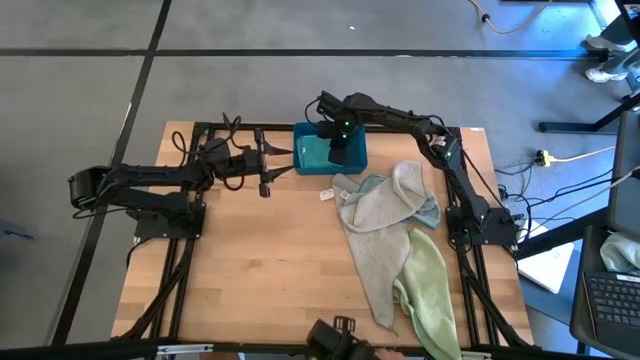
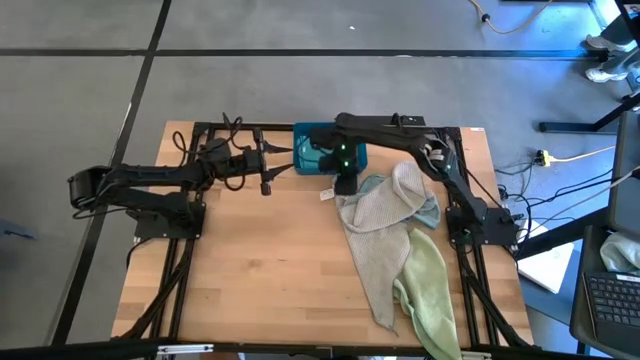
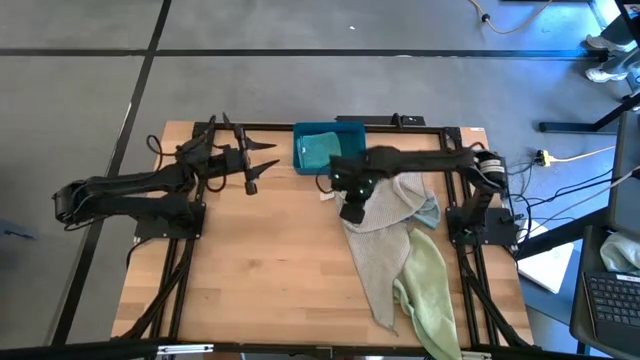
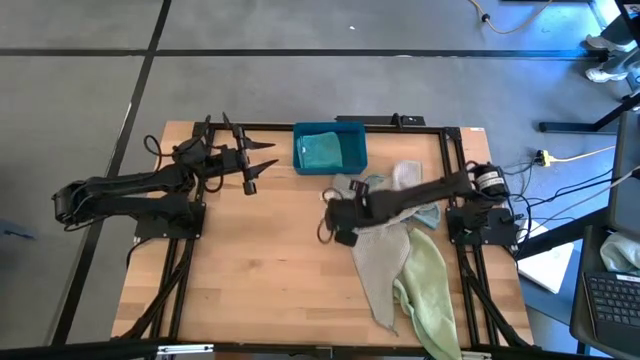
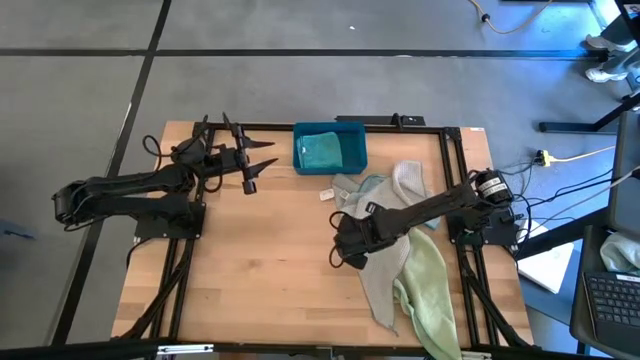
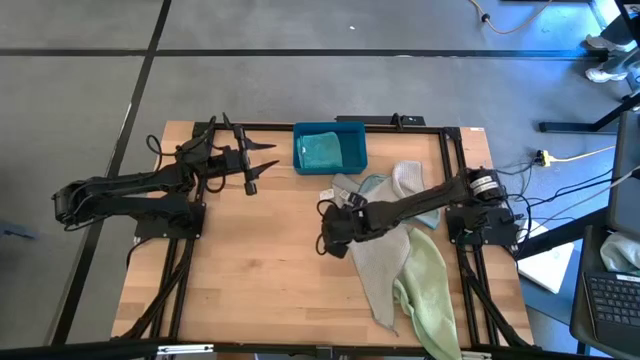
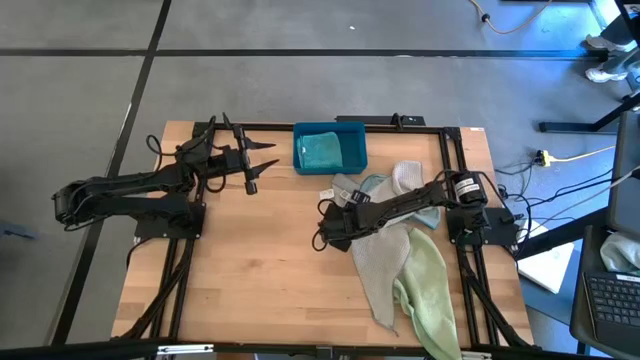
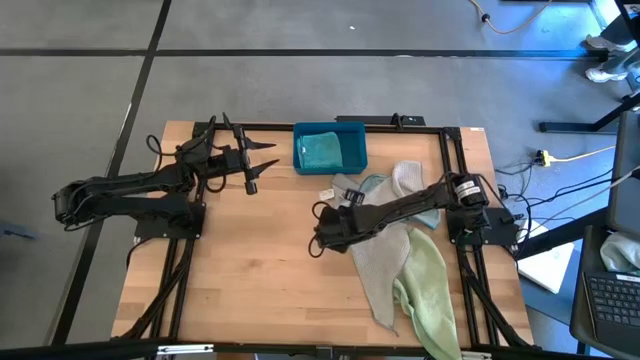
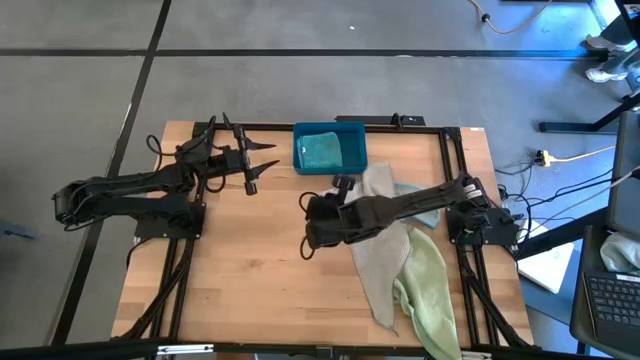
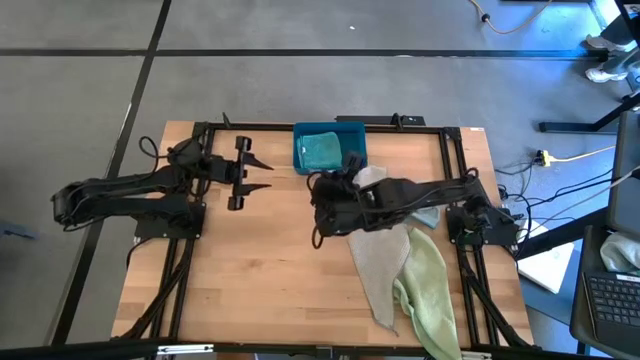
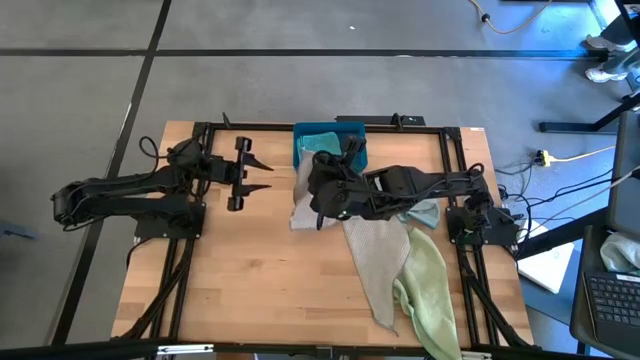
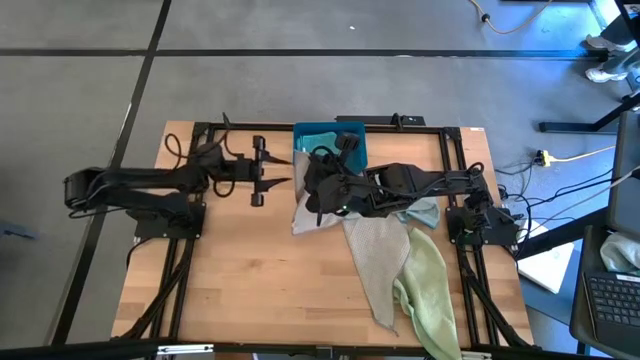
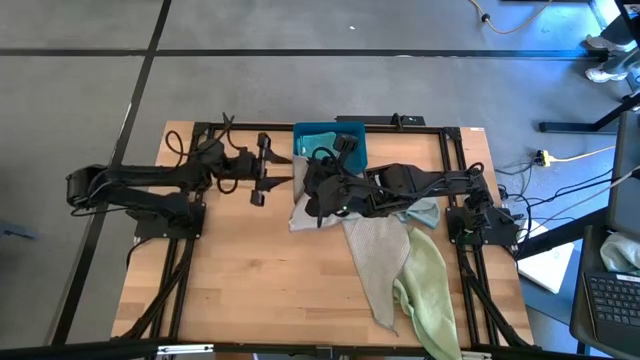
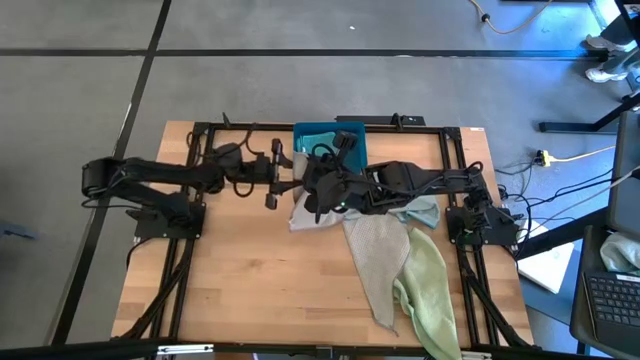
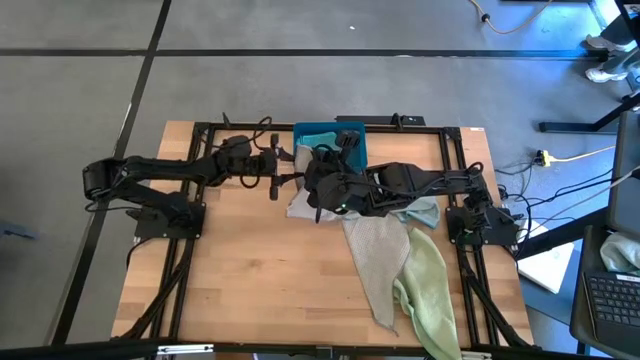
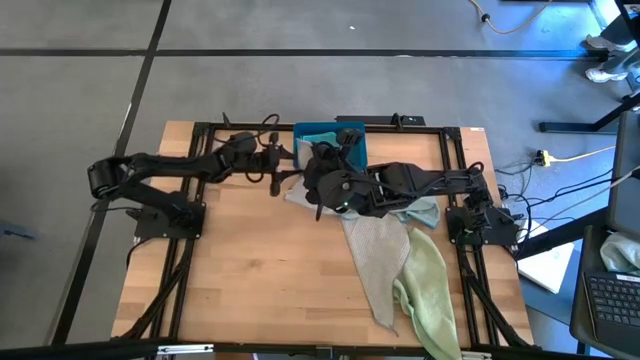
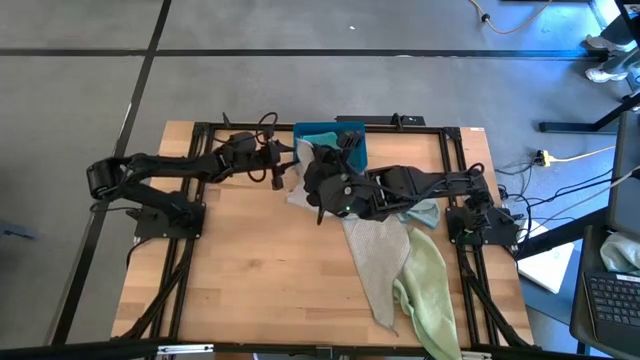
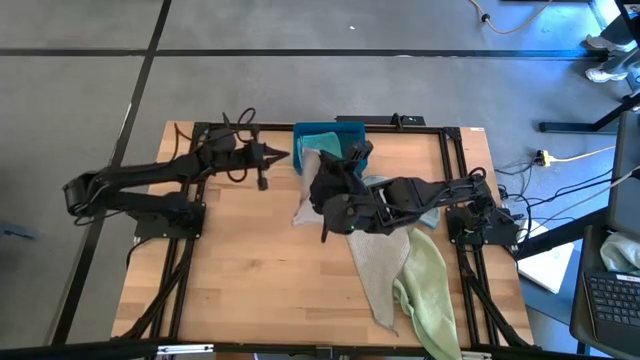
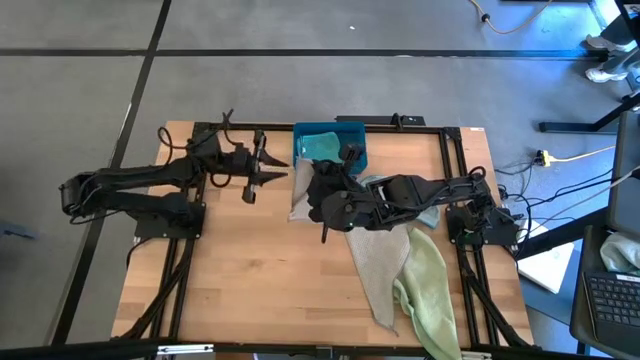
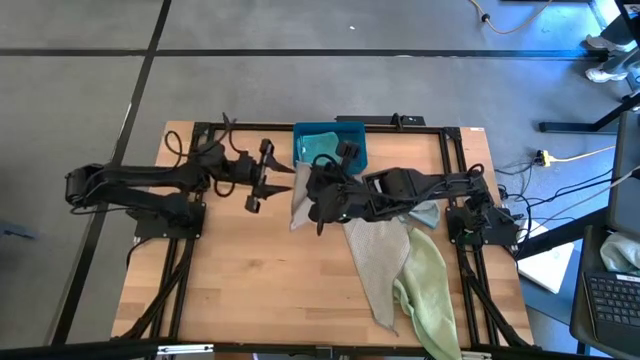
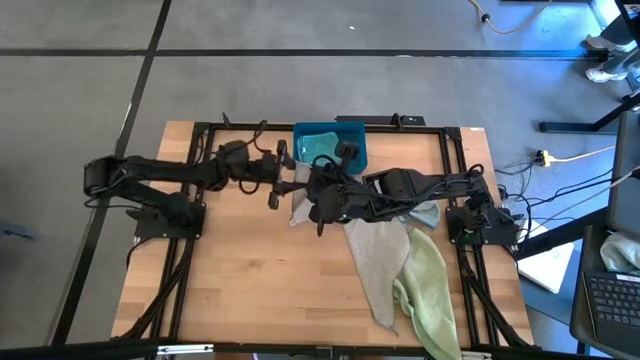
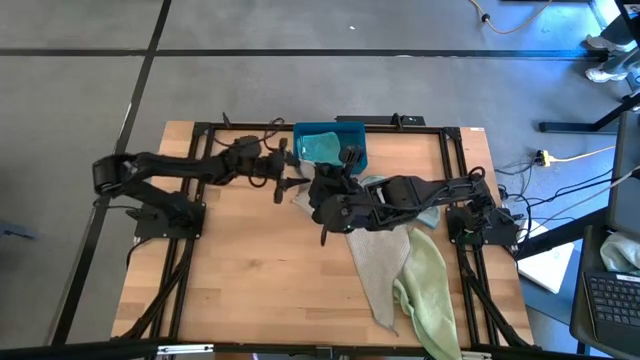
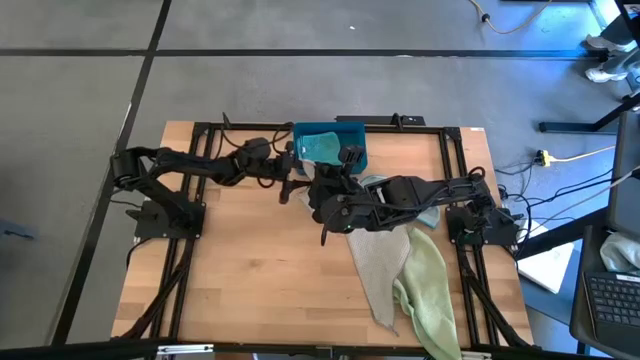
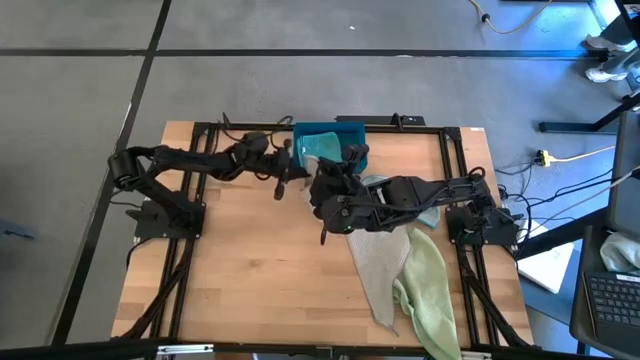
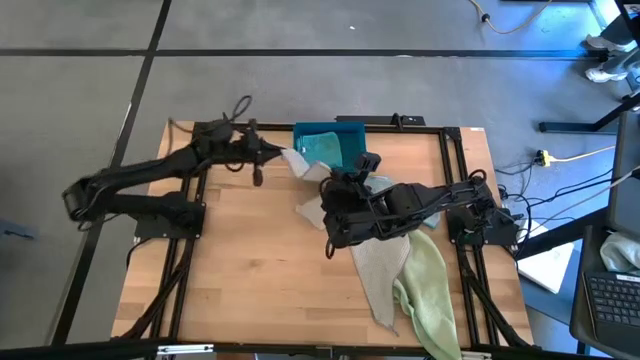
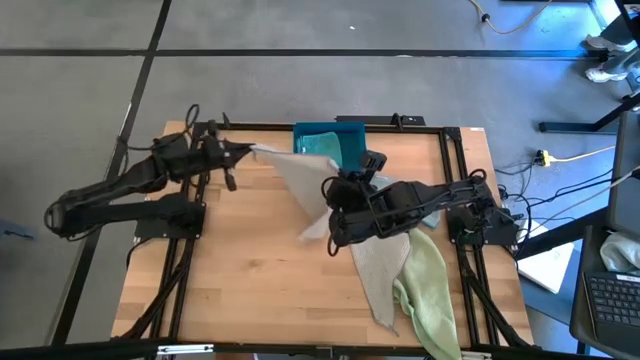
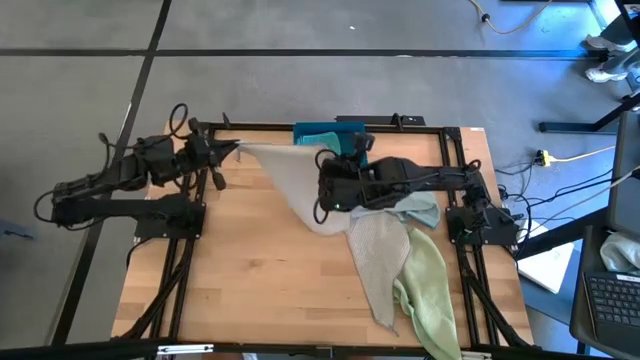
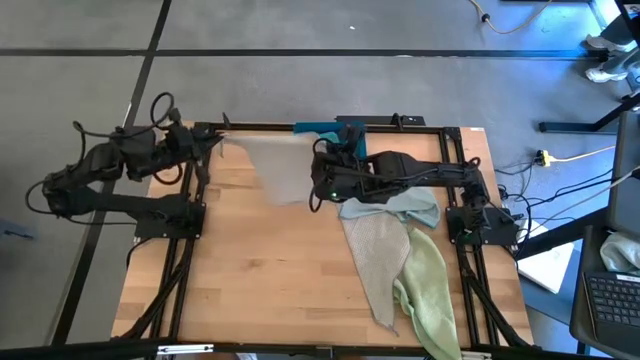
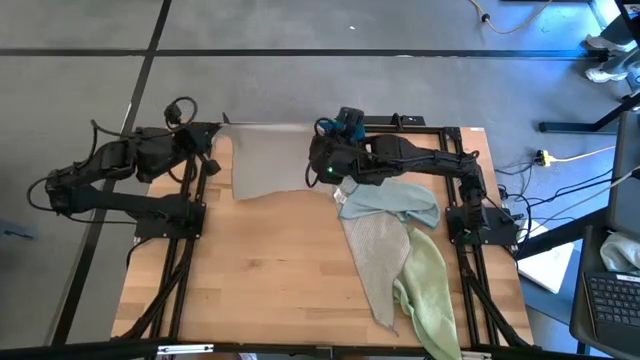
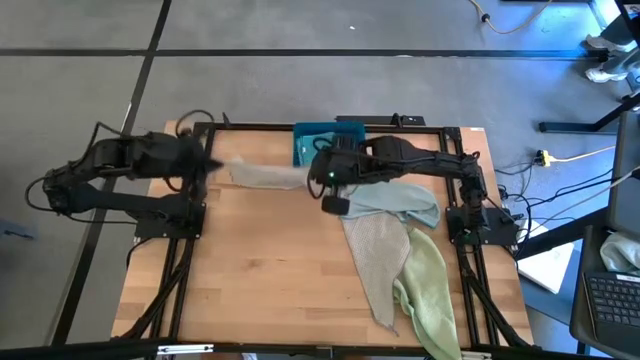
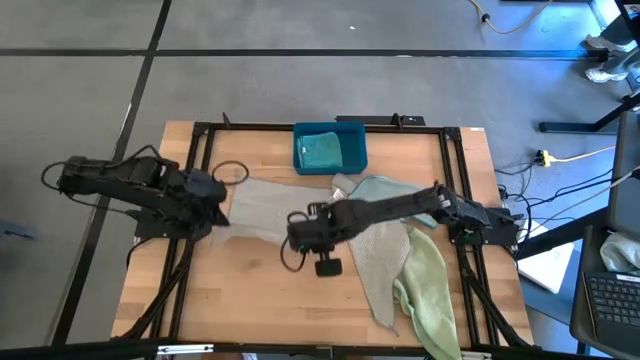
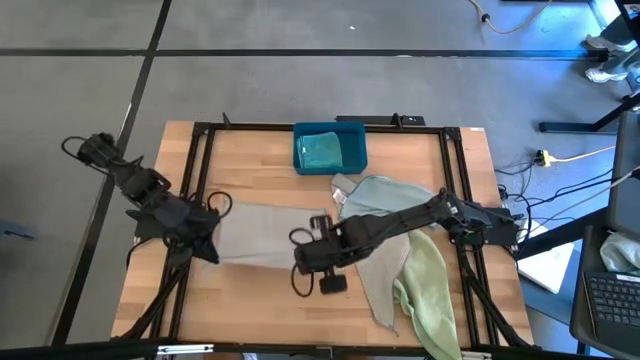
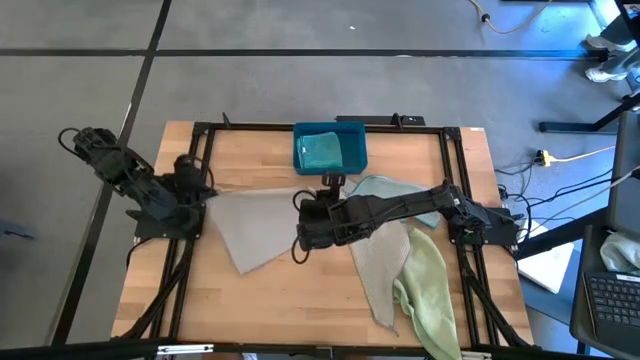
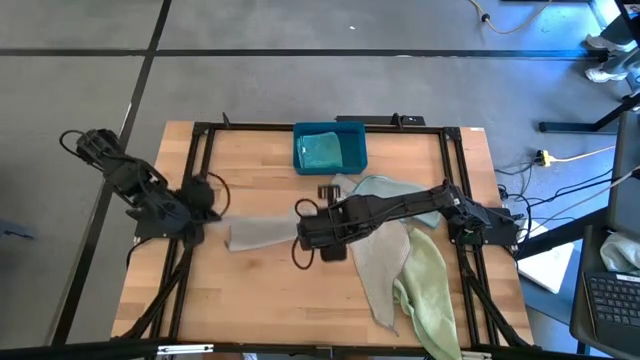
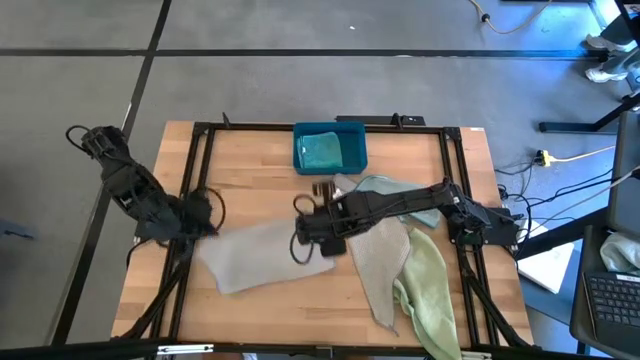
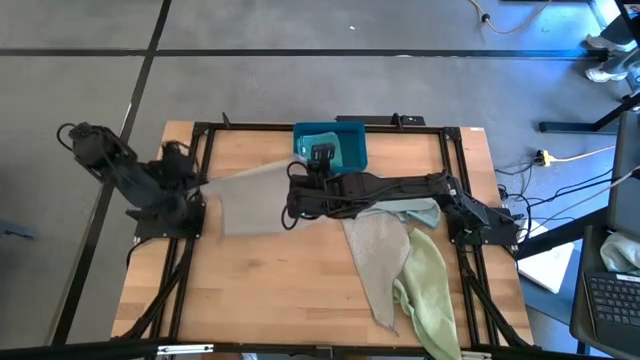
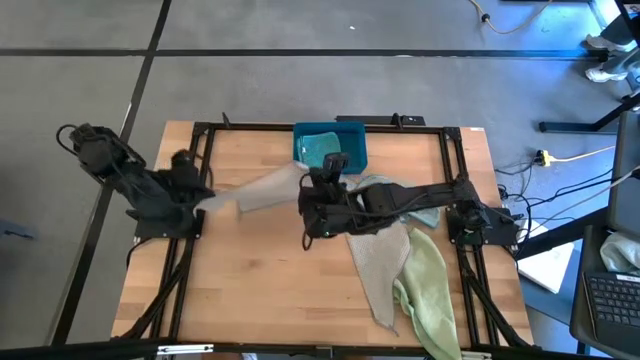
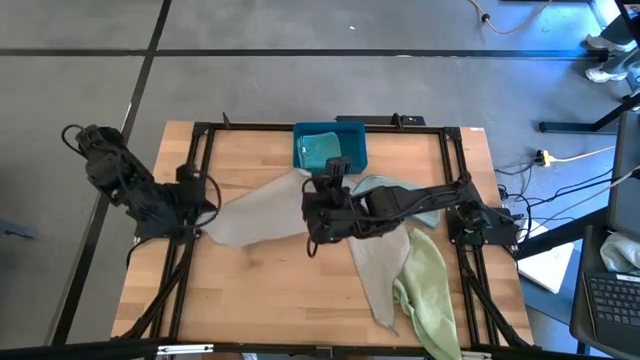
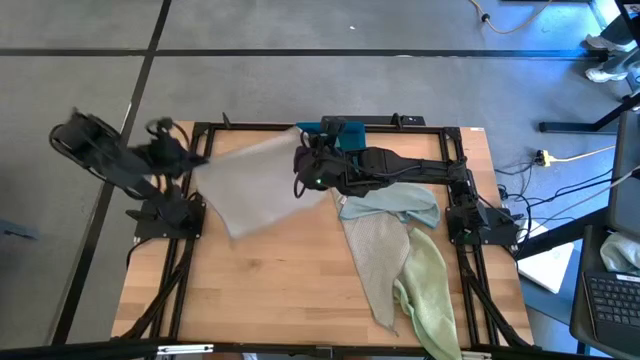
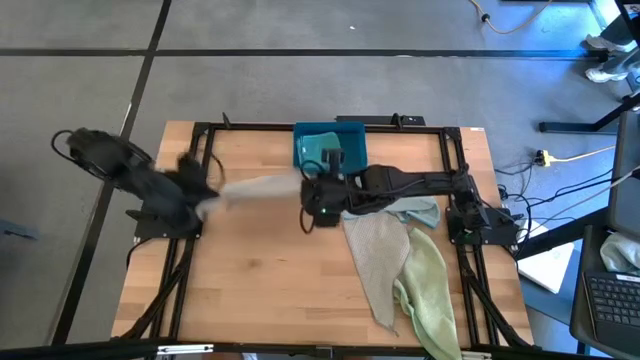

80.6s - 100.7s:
Task: Fold microfiber towels
Fold the left gray towel

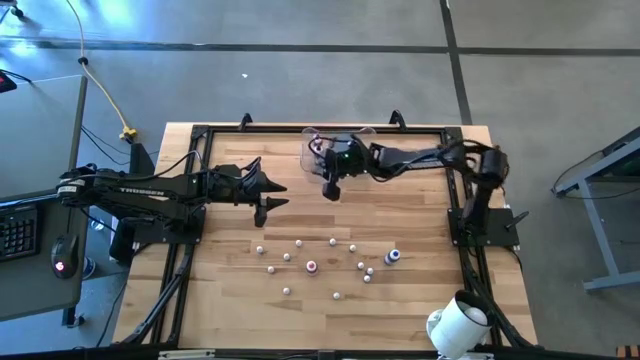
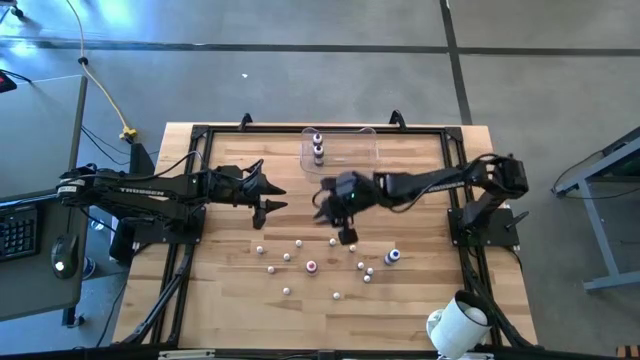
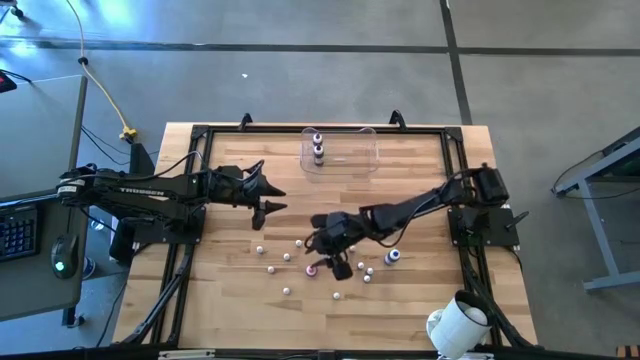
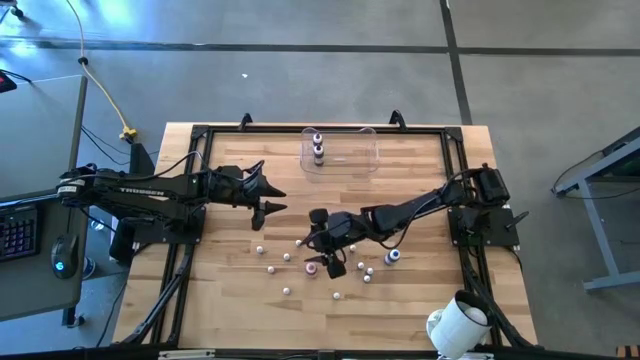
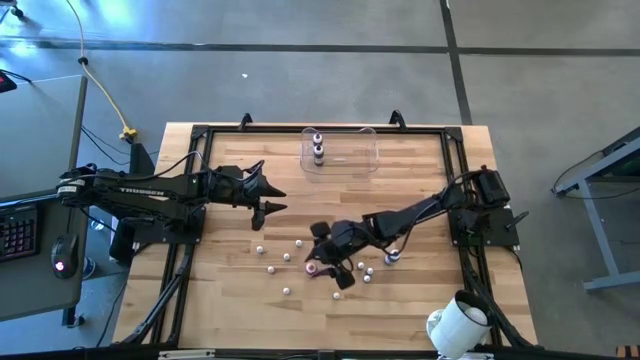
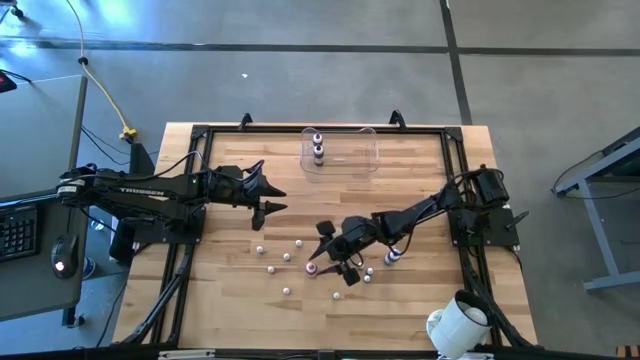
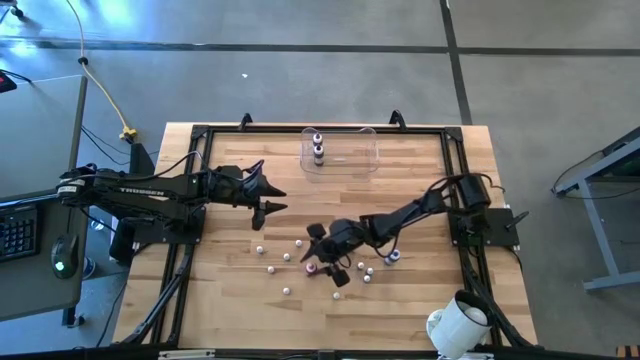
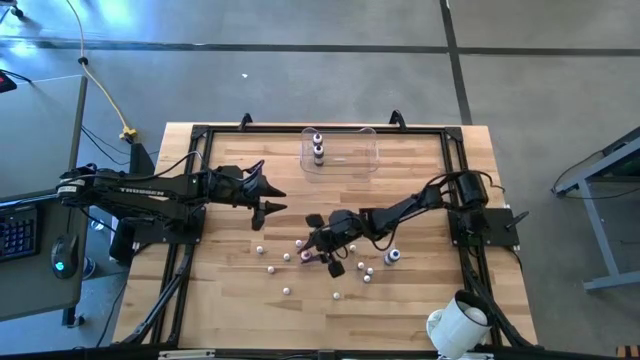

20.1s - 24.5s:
Task: Pick & Place food coloring
Put the pink food coloring into the transparent bin
